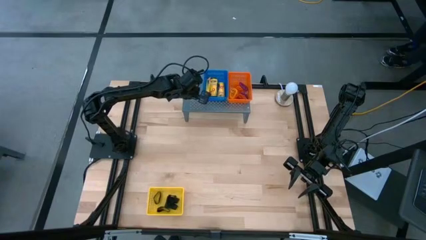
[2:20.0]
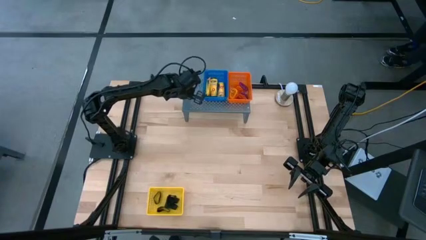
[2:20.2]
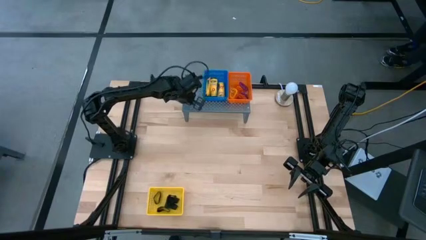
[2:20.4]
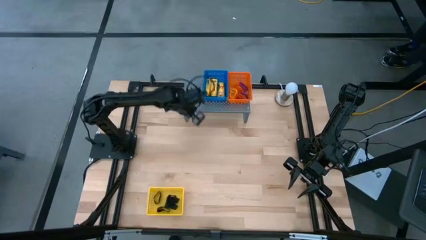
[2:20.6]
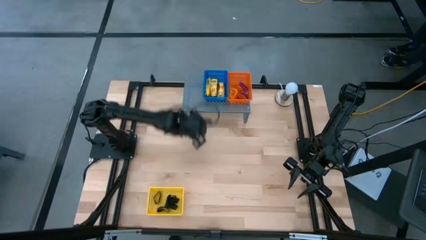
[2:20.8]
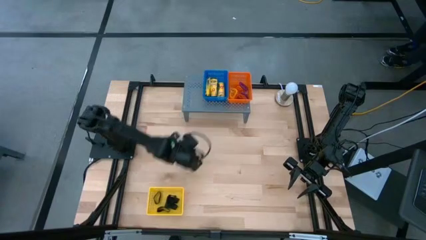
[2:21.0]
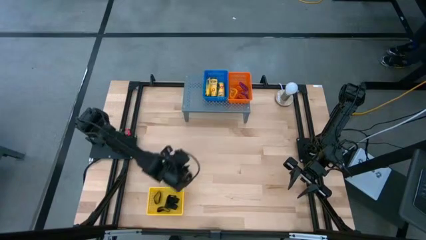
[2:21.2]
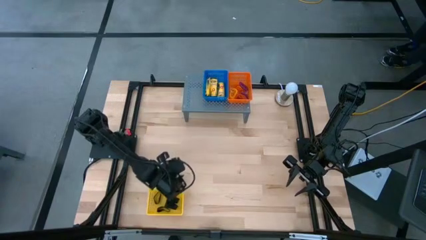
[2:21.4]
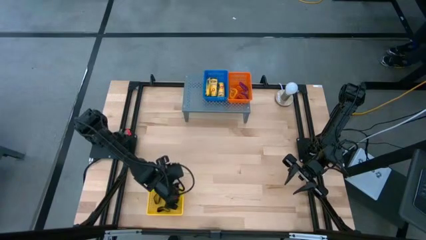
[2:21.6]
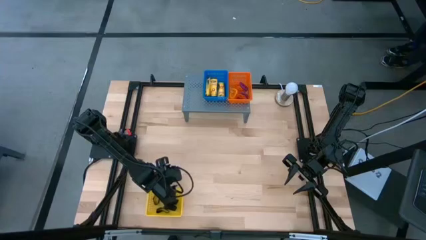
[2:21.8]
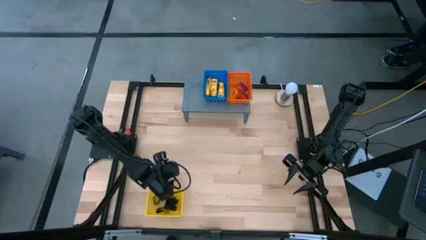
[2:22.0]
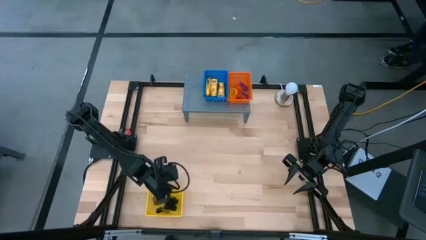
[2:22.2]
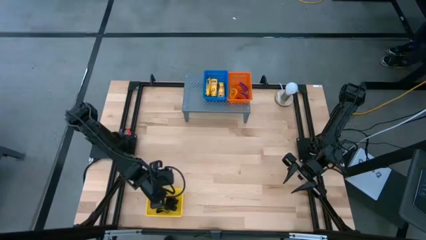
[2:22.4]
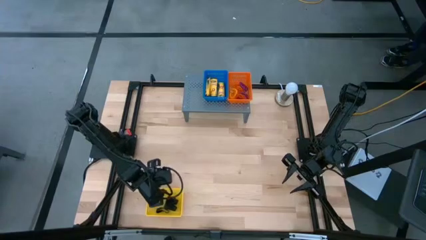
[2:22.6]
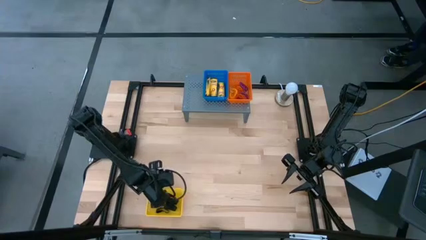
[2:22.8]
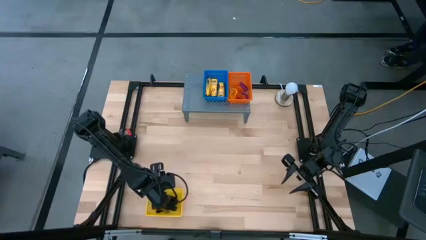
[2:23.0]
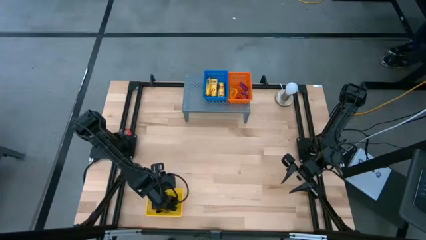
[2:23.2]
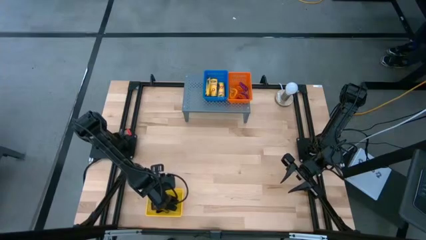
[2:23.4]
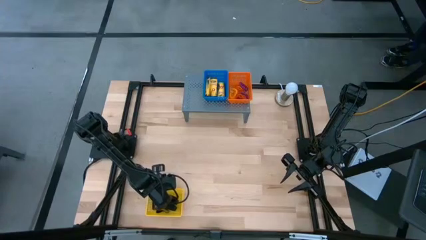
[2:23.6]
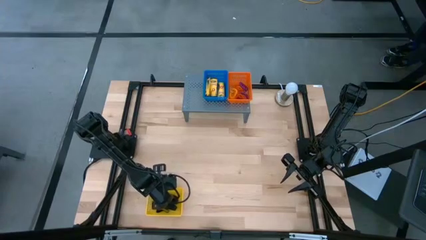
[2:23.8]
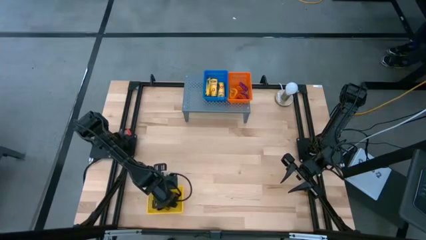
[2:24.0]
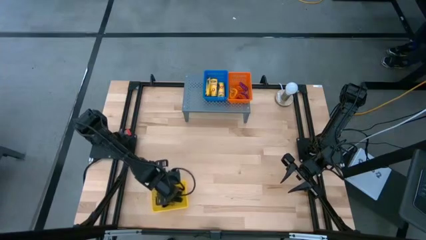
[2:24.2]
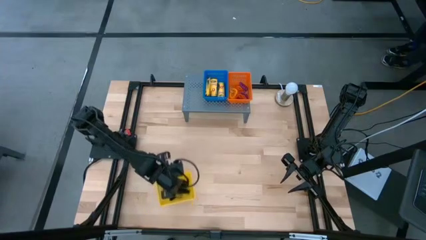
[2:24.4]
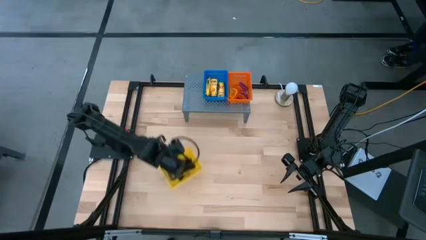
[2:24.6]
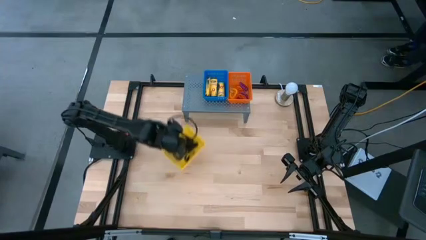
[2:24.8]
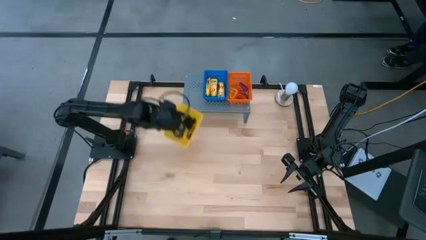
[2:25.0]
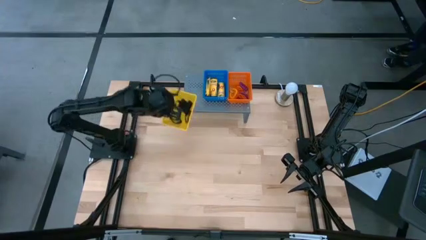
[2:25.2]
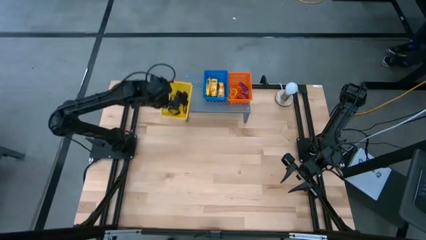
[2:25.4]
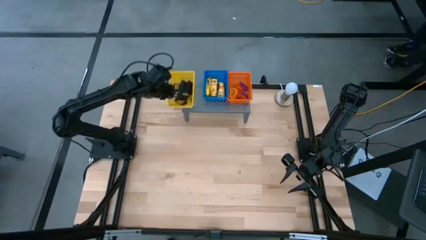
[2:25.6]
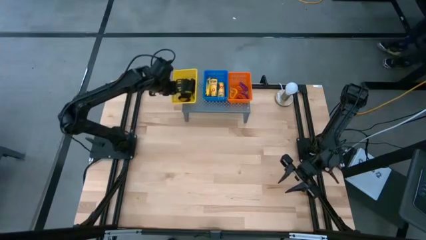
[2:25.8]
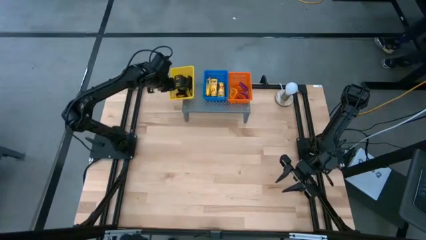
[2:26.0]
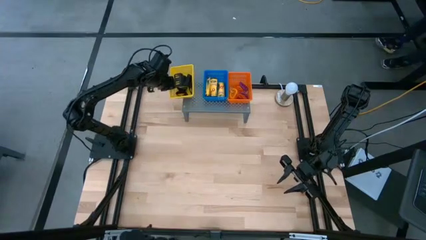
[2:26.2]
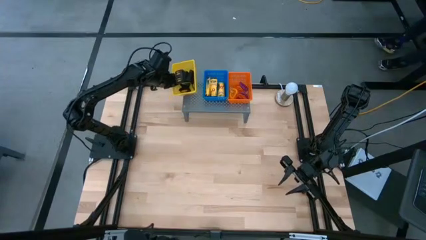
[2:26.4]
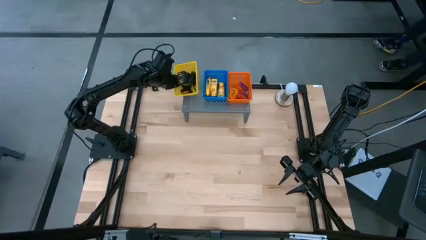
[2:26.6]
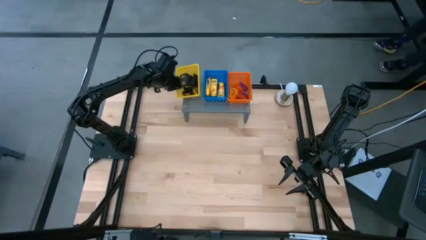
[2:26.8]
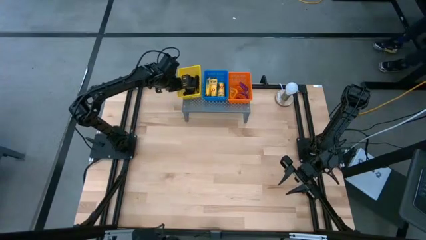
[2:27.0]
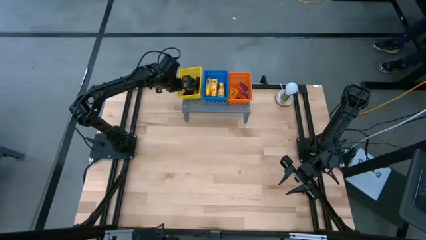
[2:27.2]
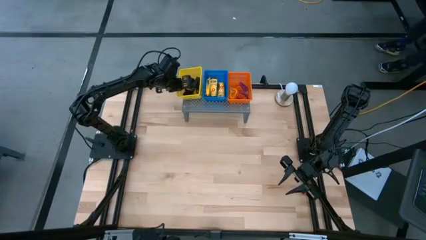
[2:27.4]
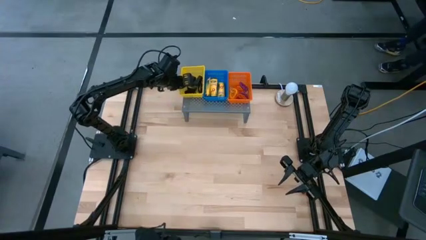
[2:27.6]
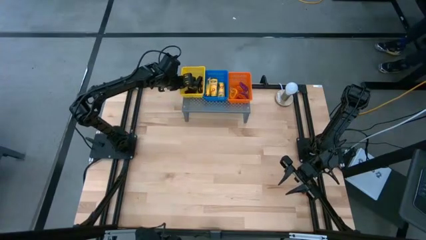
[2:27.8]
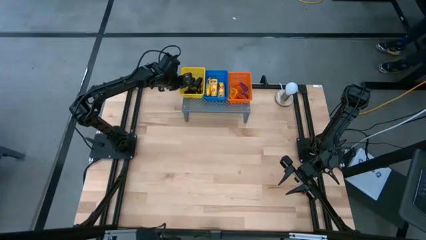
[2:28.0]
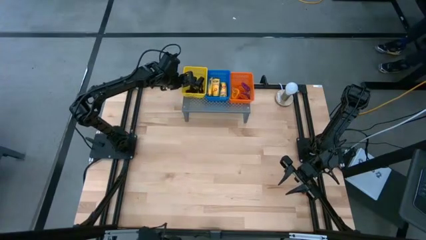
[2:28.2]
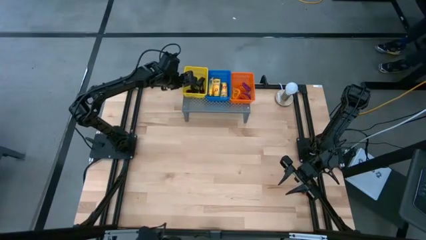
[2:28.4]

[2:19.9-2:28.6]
Task: Pick & Place Office Desk Supplies
Put the yellow basket onto the shelf

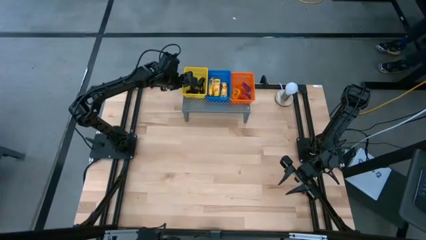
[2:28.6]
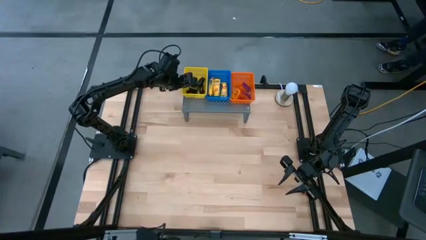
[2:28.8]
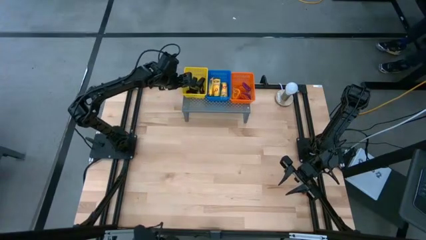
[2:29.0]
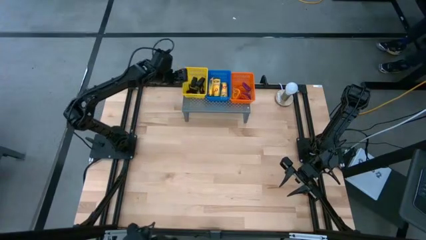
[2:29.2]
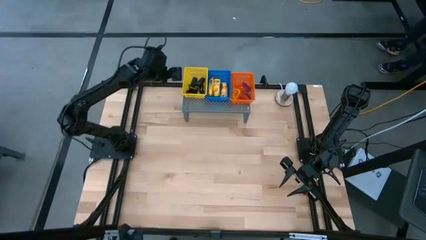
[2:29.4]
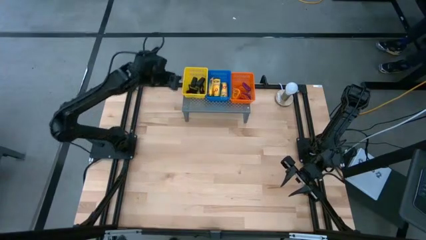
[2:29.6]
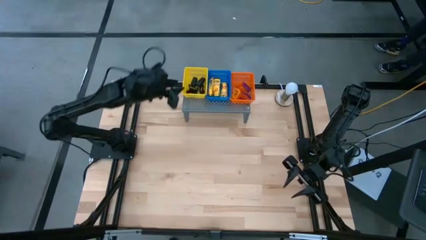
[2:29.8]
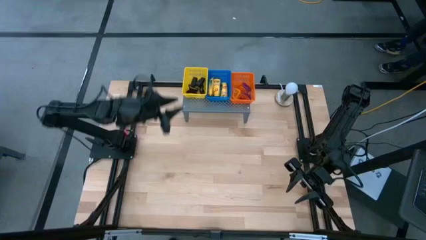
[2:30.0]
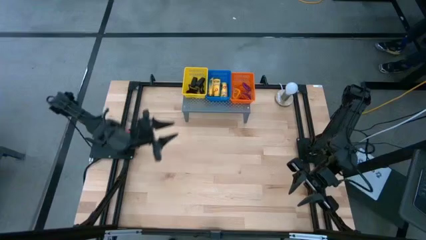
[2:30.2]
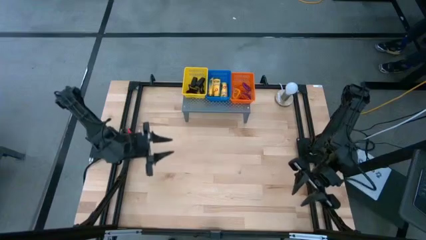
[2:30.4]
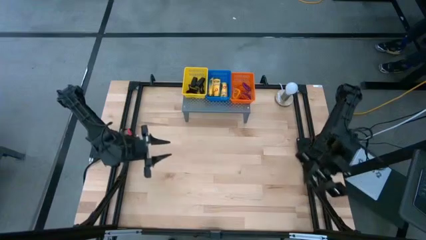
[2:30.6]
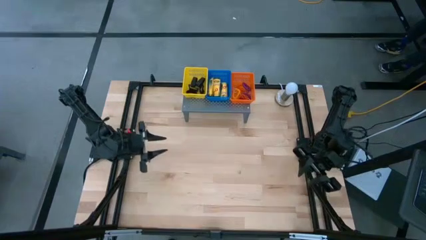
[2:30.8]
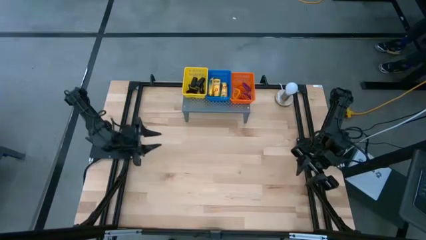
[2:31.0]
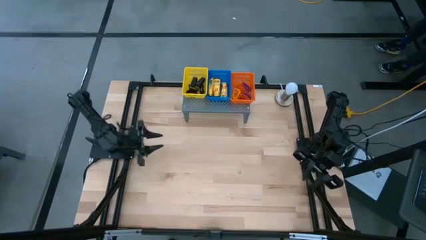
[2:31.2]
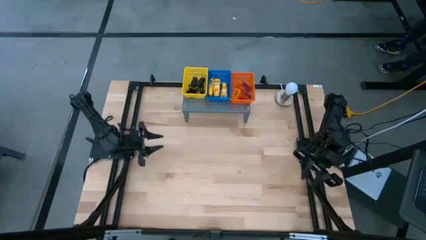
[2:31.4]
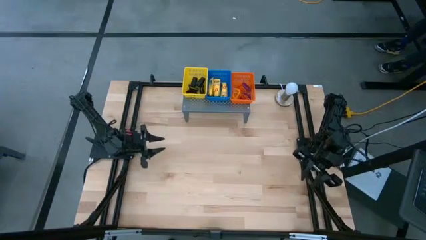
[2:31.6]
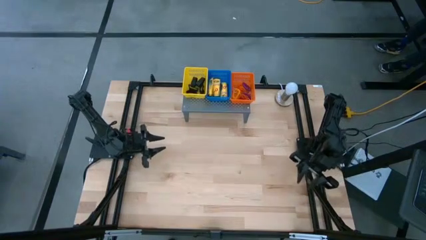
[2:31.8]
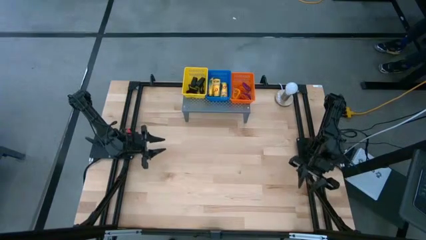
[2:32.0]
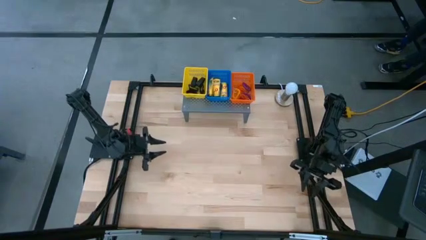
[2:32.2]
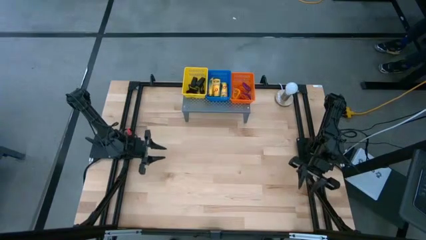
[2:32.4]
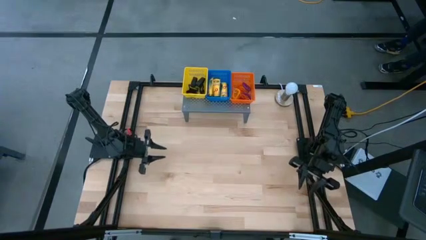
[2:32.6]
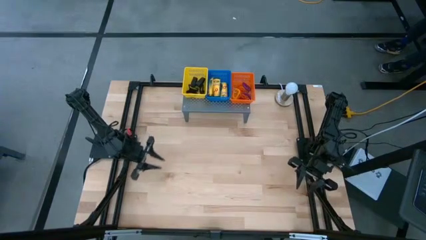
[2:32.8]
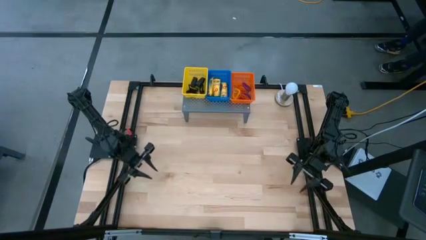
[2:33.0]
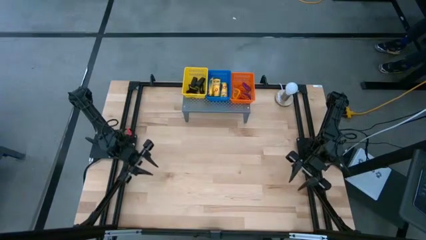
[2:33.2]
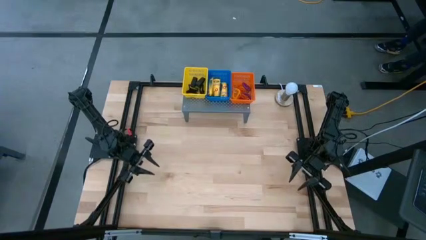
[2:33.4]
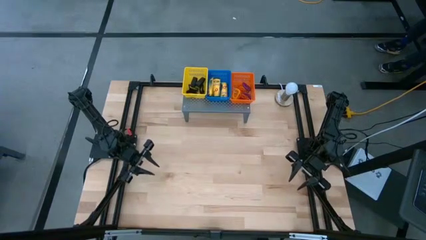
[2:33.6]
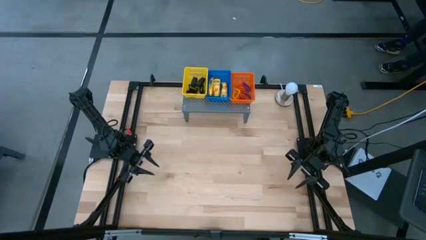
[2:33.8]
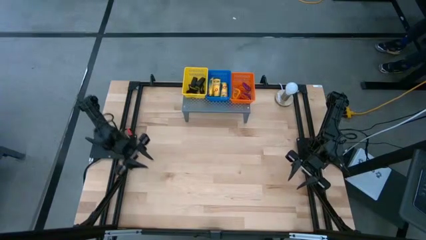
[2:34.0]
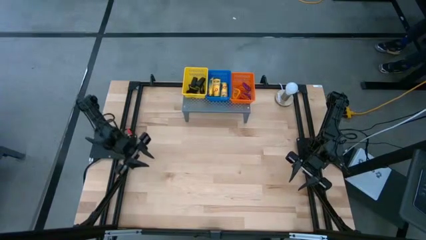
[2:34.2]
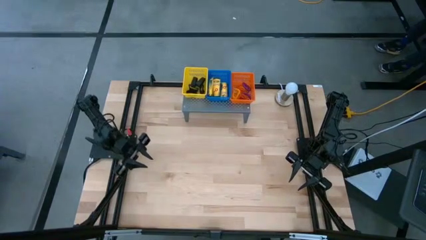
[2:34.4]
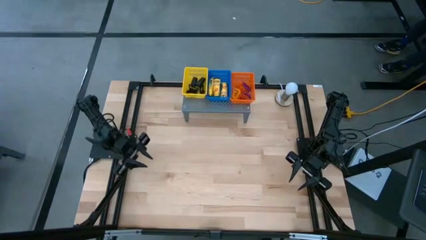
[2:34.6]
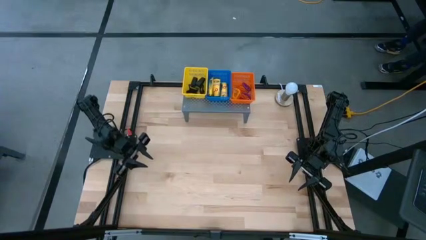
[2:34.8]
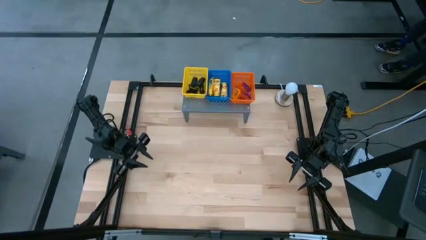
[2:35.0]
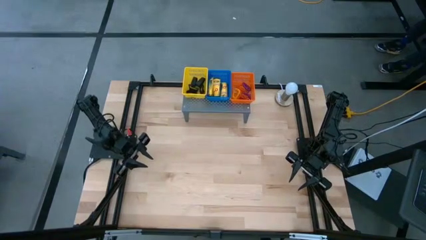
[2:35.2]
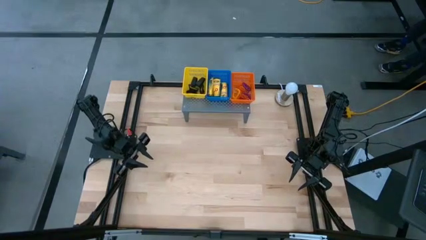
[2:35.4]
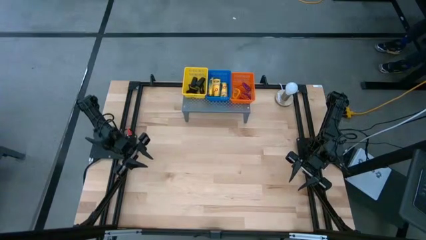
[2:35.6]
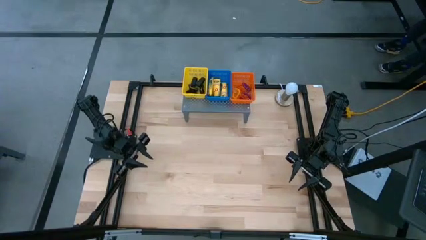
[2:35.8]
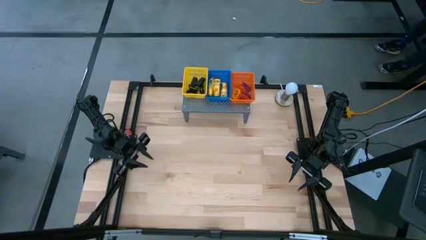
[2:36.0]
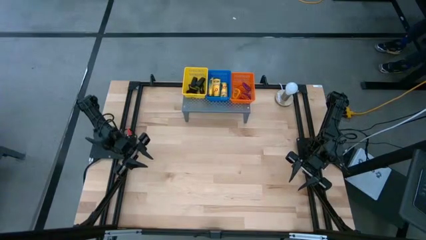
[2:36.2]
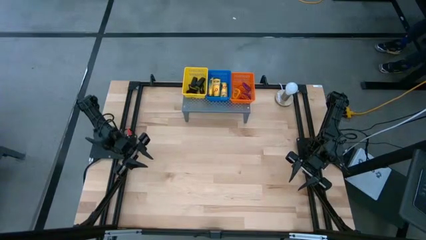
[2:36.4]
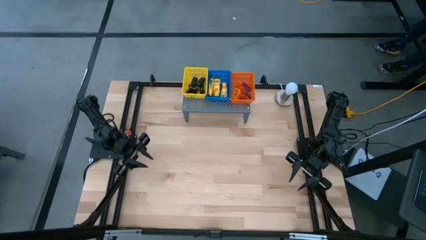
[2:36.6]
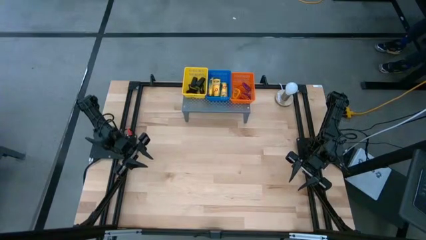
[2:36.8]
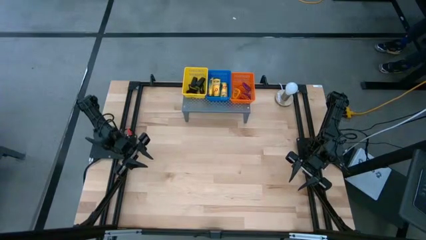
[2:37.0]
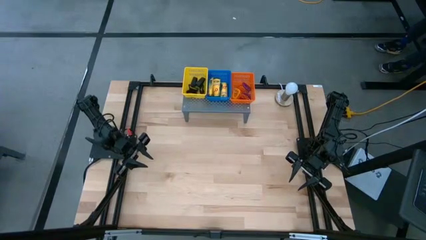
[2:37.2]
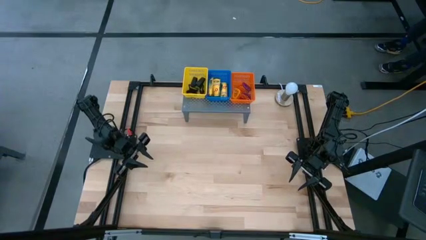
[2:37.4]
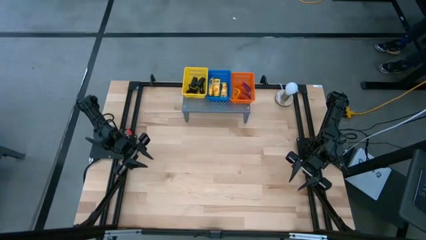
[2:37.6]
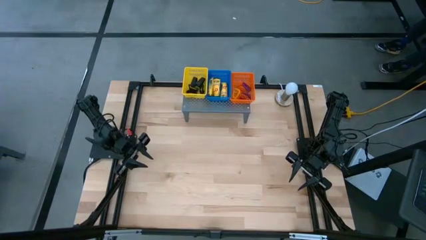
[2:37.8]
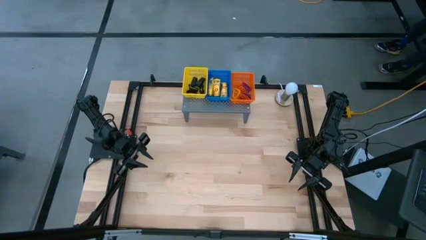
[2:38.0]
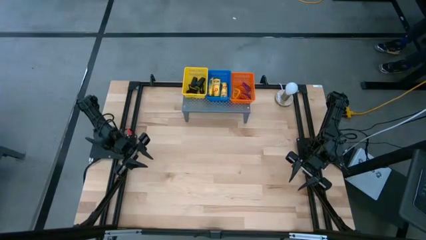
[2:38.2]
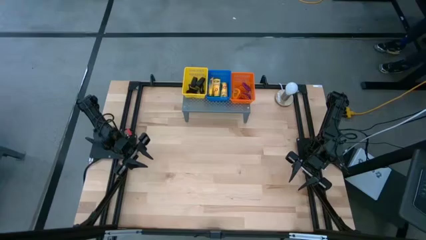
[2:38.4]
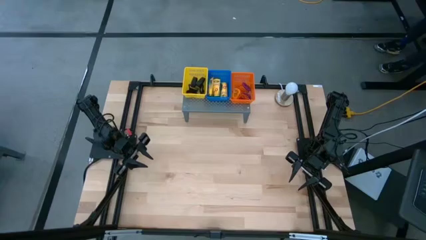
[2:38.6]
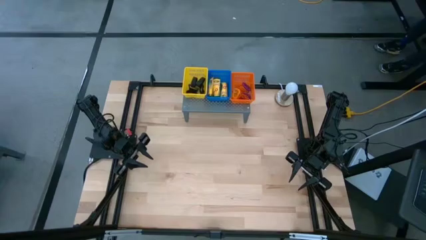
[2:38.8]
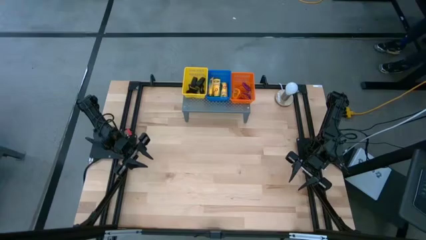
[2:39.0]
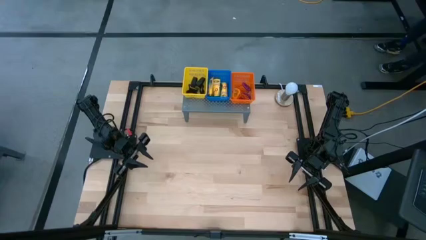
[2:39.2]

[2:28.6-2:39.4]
Return to Home Position
